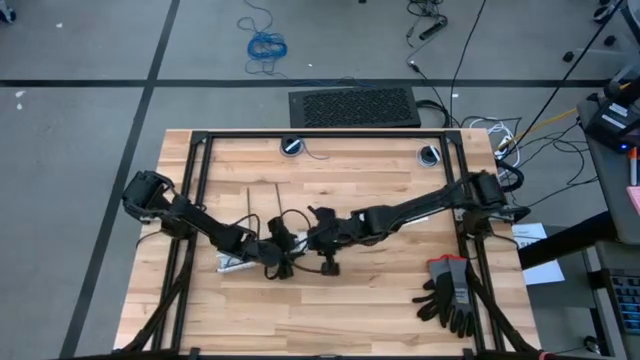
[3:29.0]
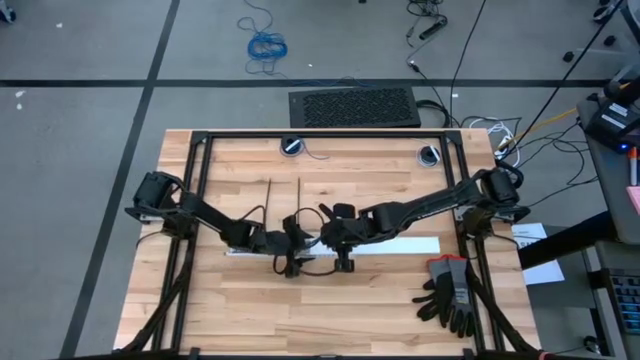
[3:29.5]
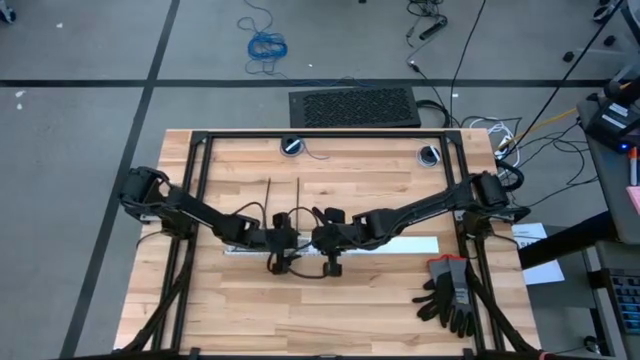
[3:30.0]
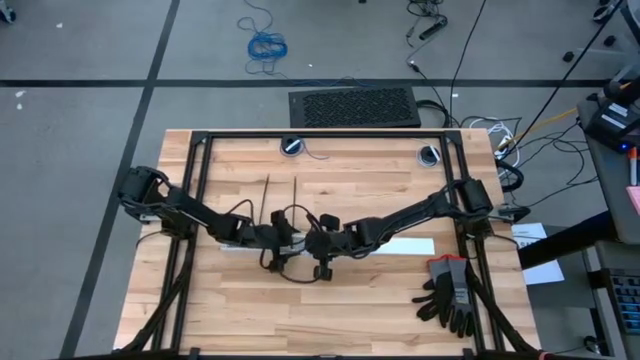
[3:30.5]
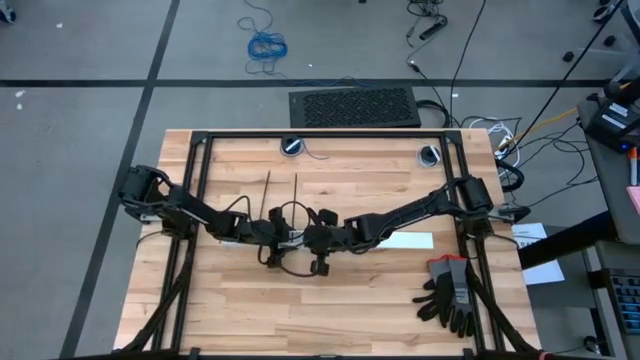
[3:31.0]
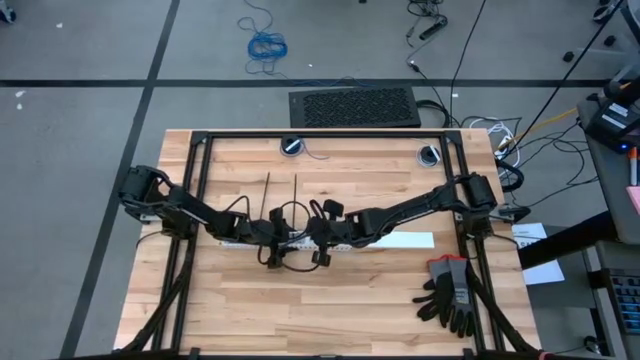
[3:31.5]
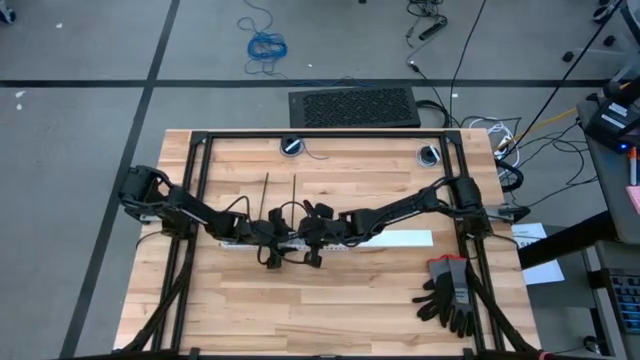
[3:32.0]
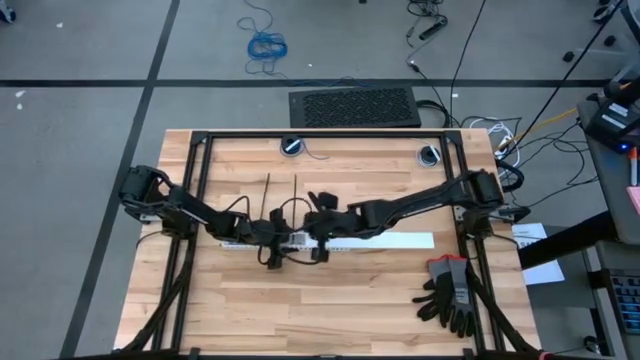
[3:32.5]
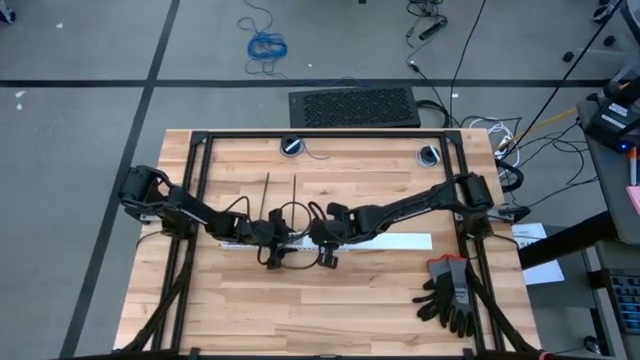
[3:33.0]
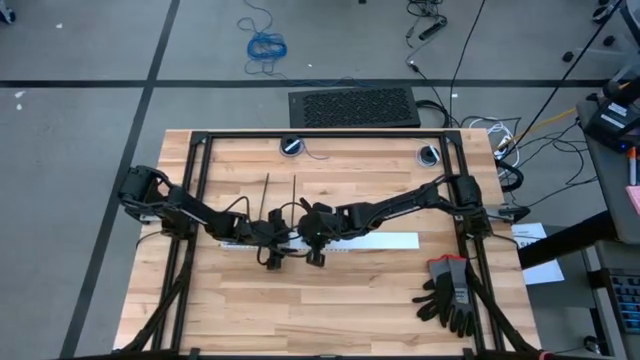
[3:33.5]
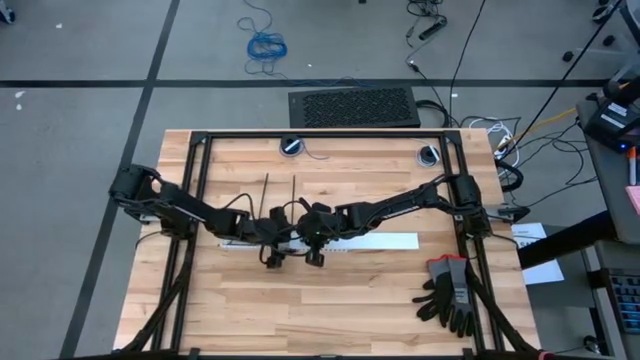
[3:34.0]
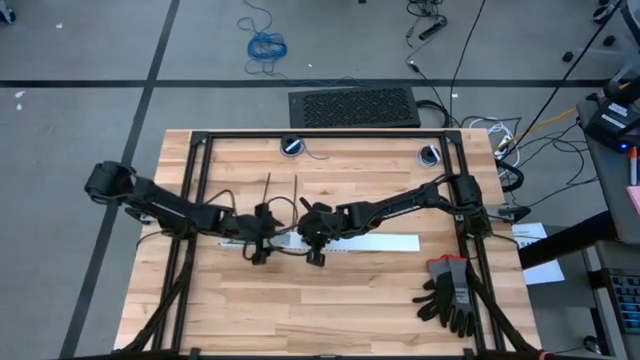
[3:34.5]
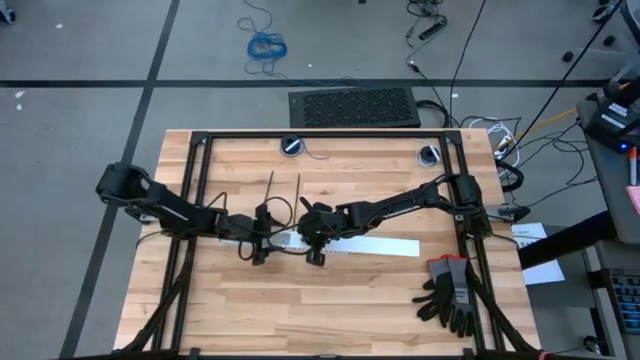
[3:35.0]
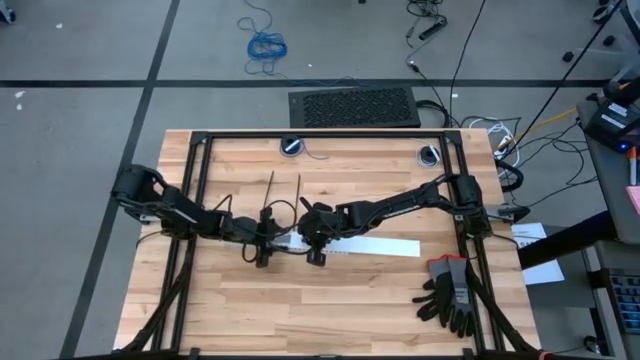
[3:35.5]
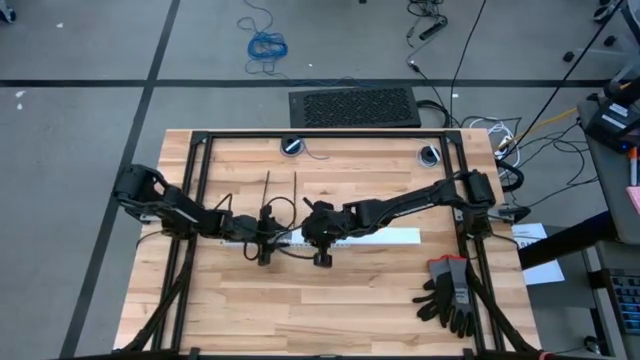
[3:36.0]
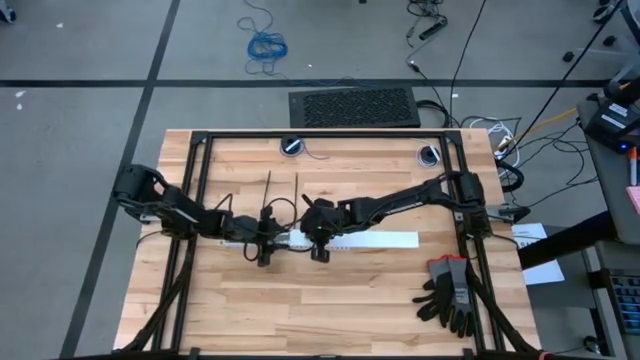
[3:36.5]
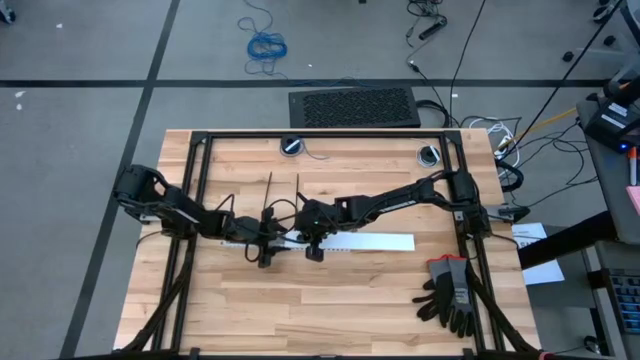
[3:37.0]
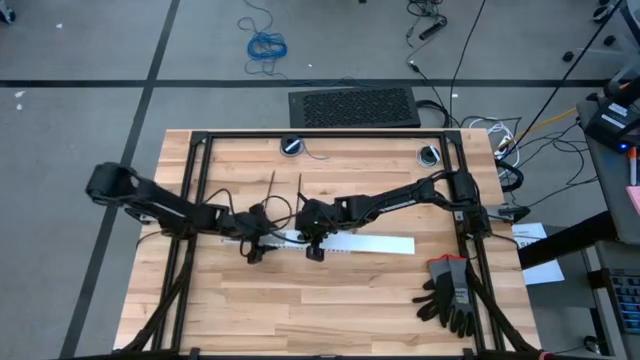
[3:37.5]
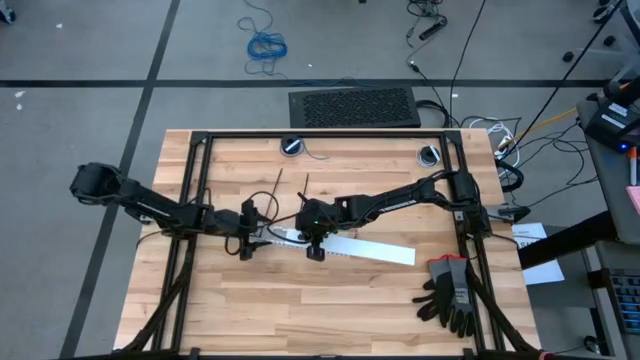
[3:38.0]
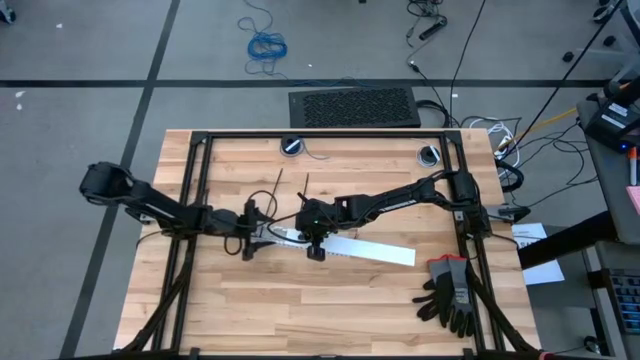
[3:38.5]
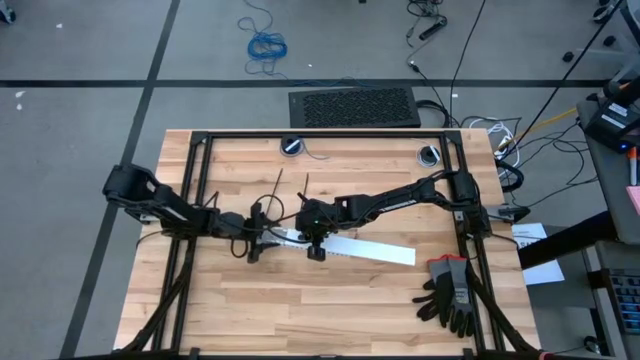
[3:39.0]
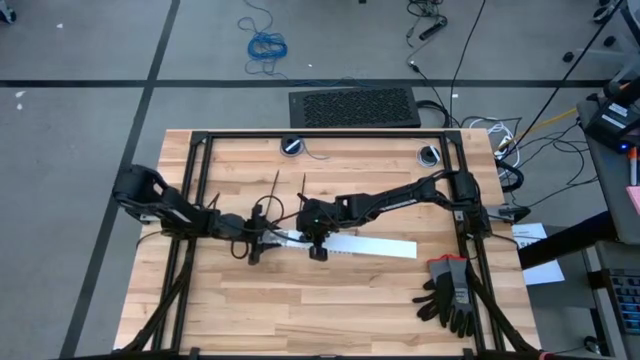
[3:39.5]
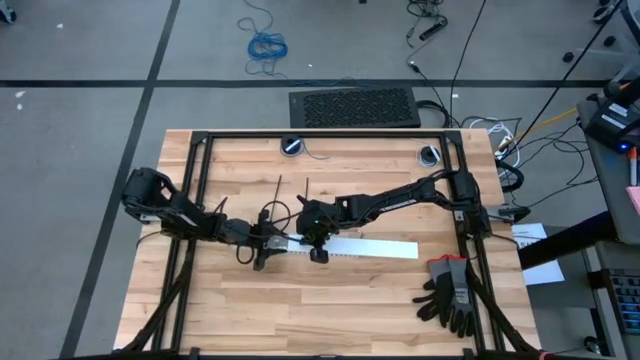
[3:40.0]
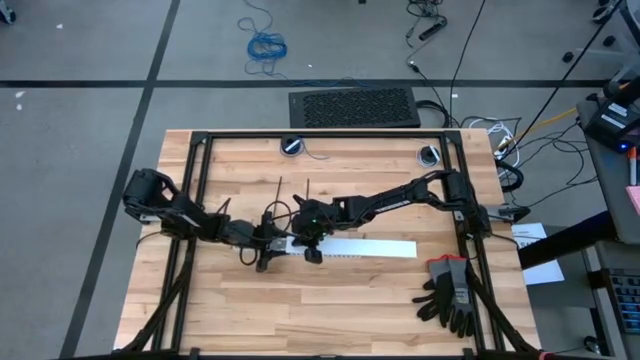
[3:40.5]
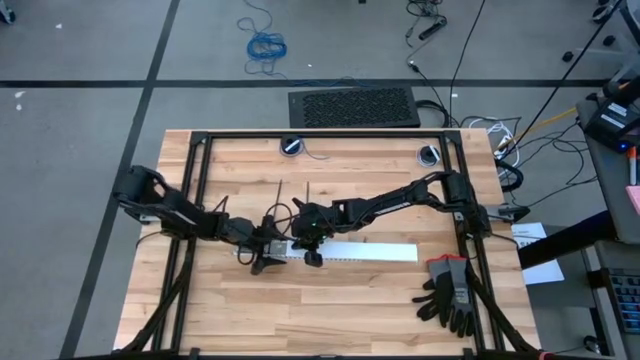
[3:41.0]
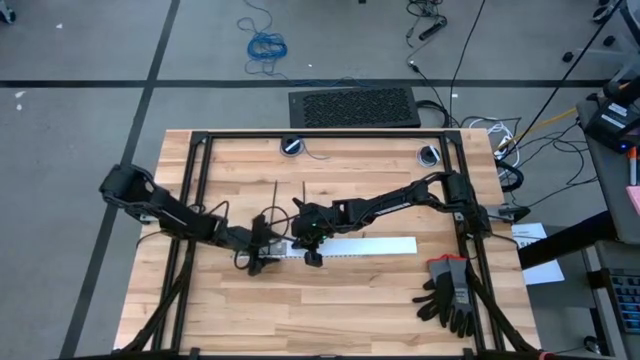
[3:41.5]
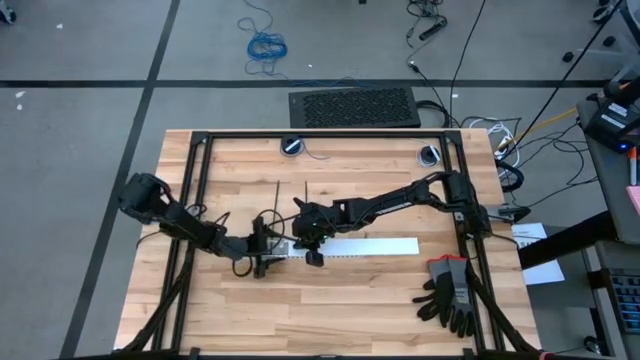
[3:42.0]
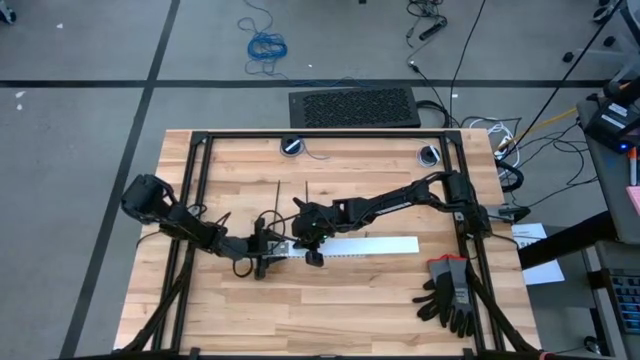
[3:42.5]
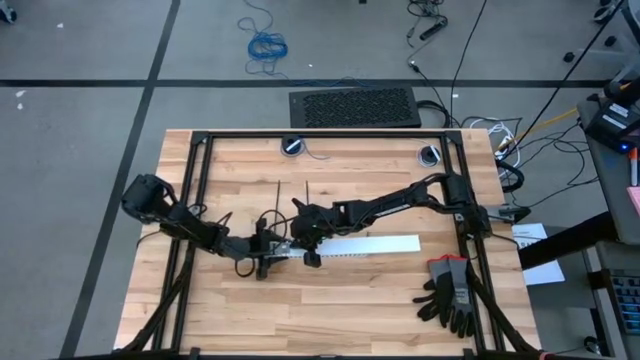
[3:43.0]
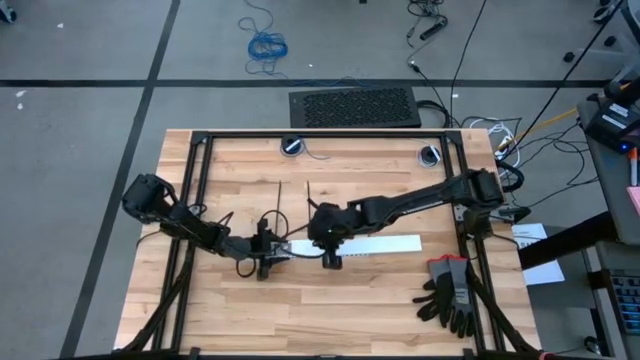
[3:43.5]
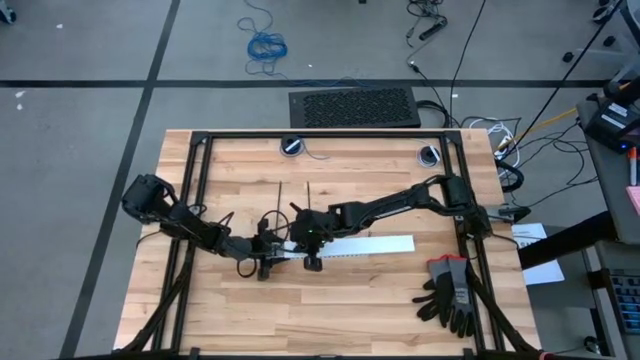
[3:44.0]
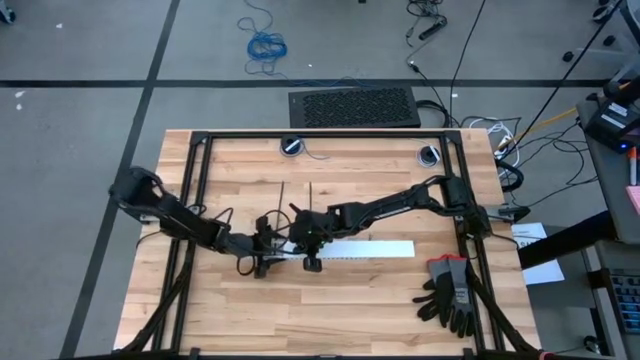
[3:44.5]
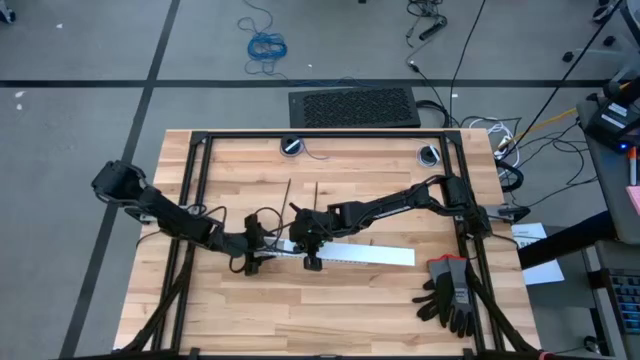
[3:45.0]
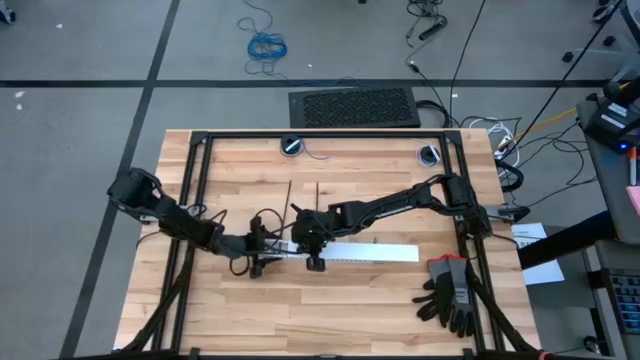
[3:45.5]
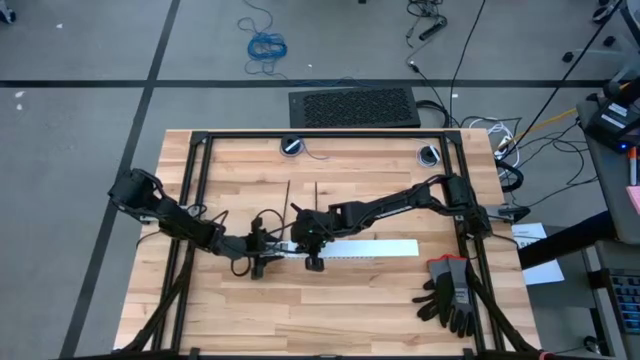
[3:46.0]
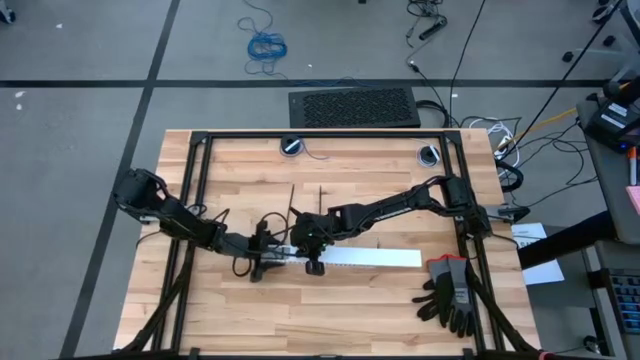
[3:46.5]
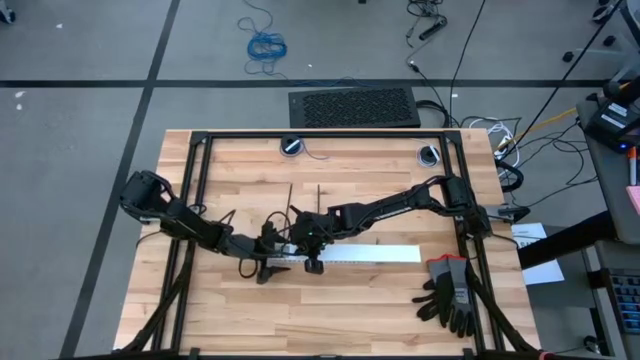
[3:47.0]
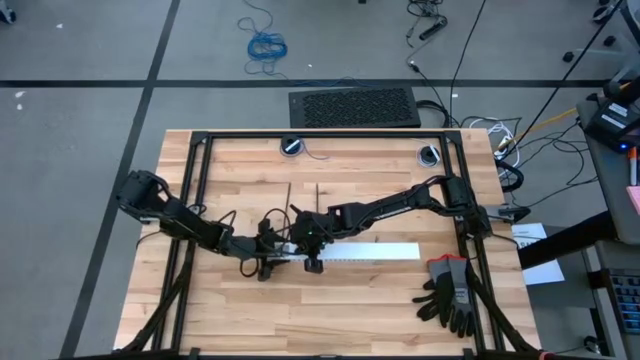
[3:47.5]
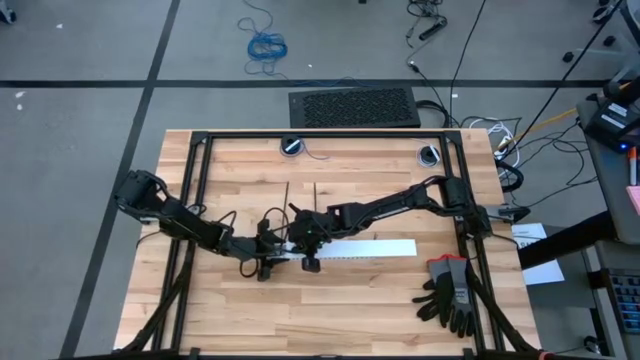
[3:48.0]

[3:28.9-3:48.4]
Task: Ziptie cables
Close the white cable duct

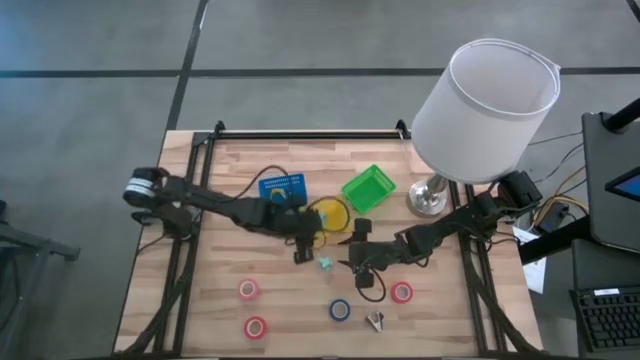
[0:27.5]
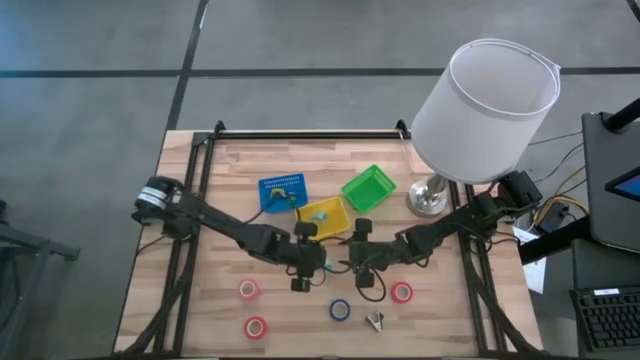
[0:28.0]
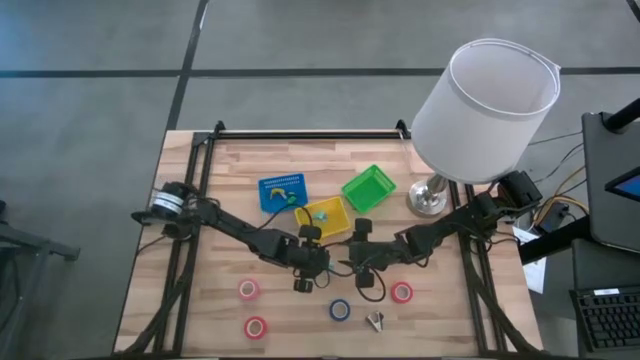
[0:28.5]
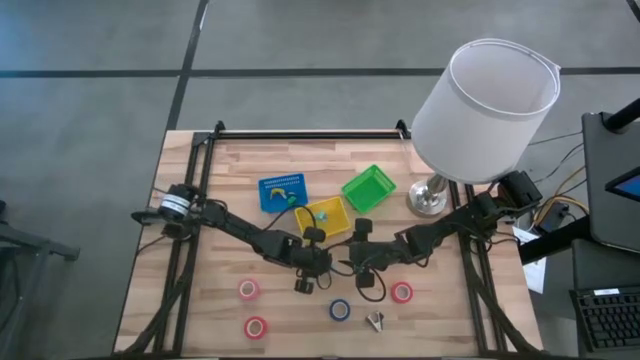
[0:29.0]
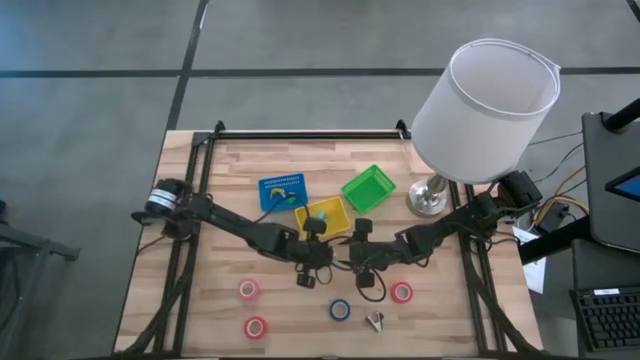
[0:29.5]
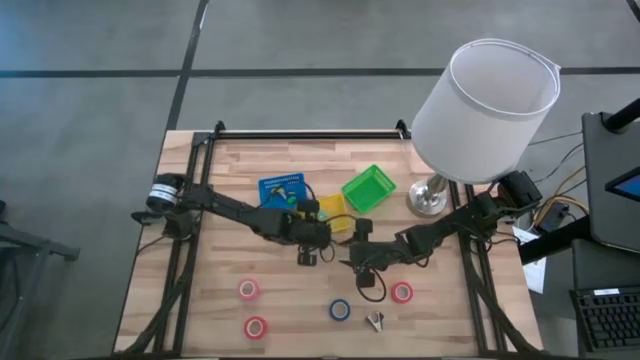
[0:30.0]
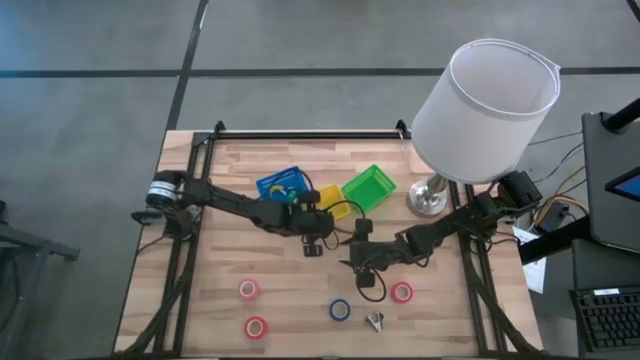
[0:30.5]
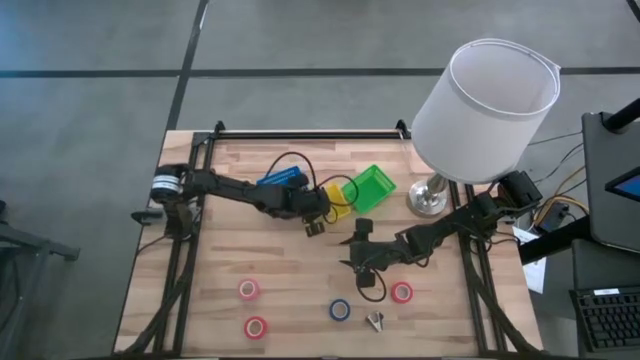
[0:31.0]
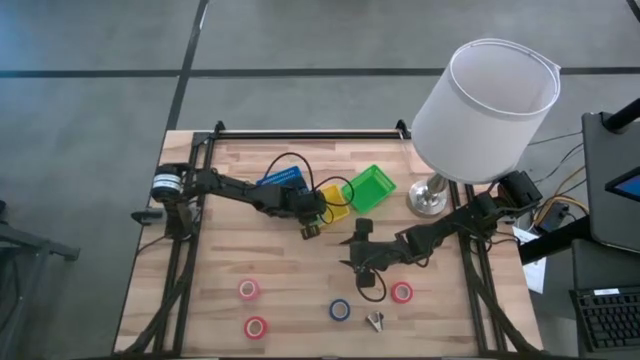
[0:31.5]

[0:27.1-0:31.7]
Task: Pick and place Stapler, Stapler remover, tape
Put the light blue staple remover into the yellow bin
